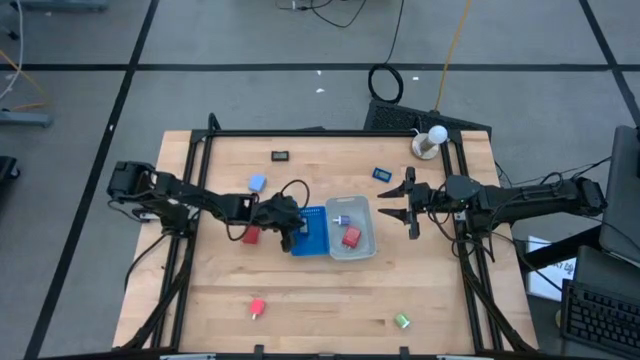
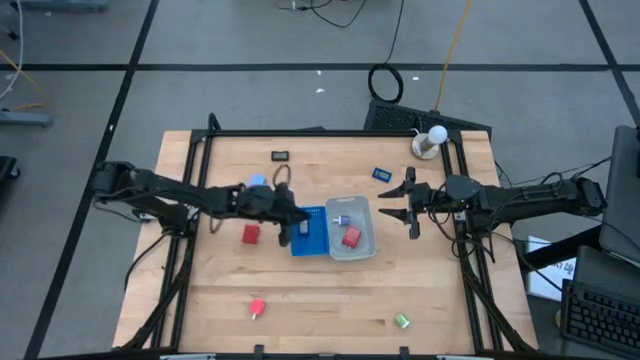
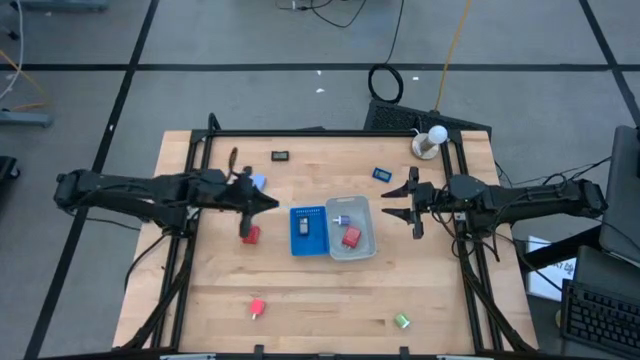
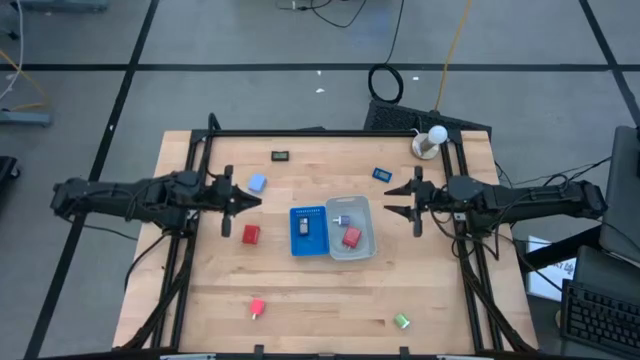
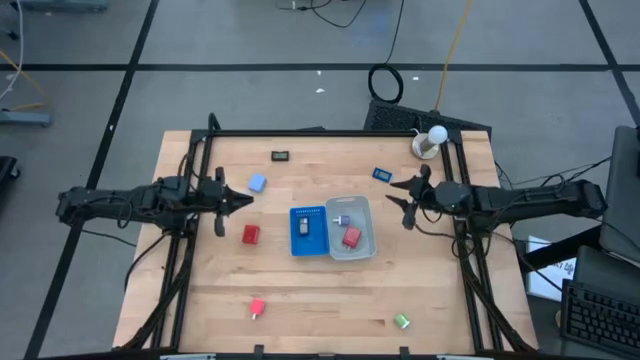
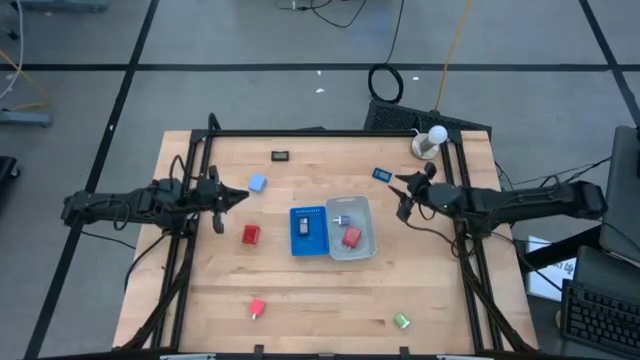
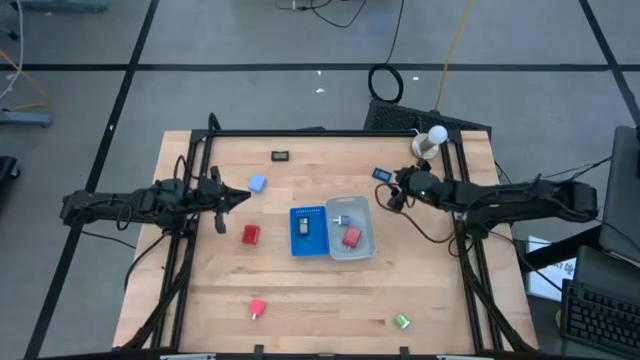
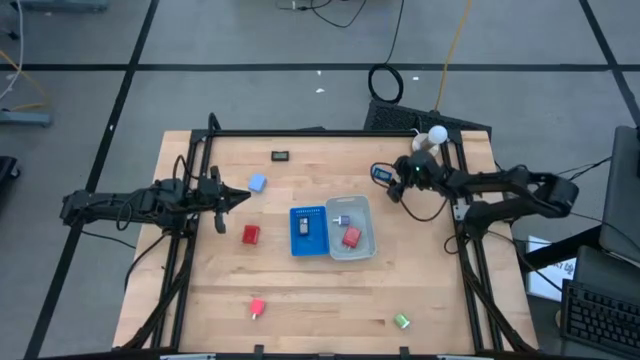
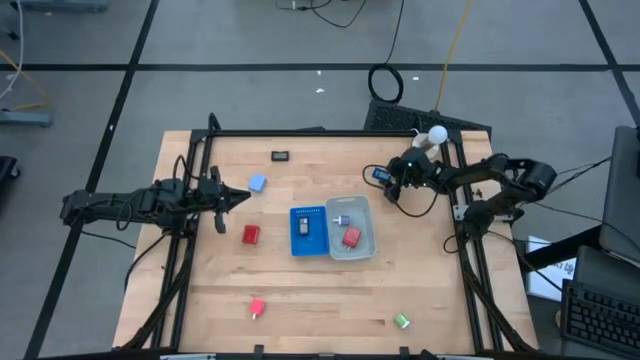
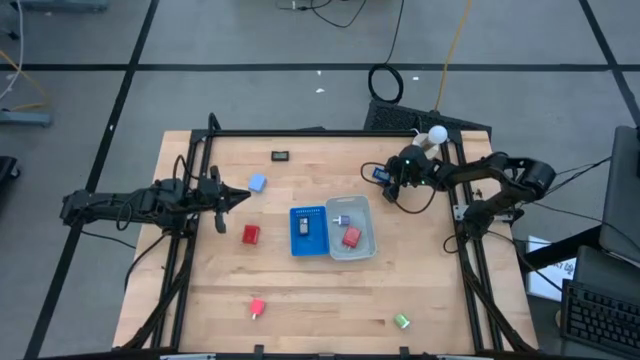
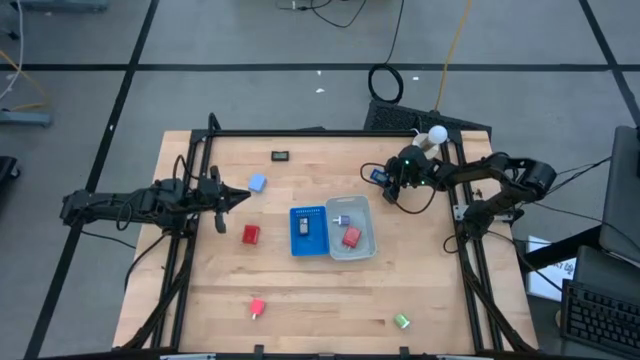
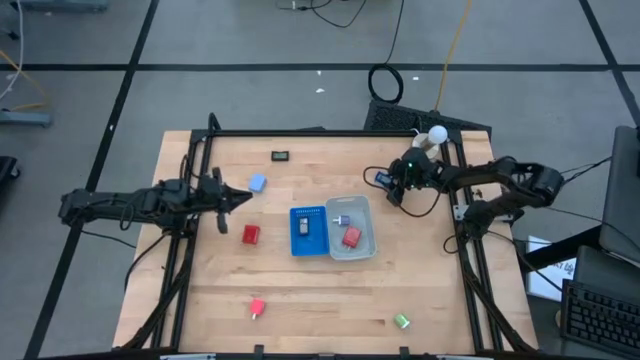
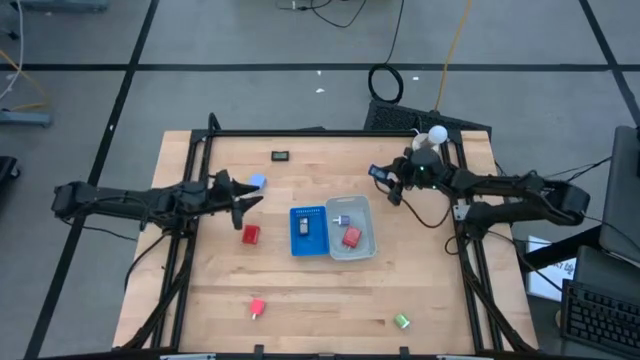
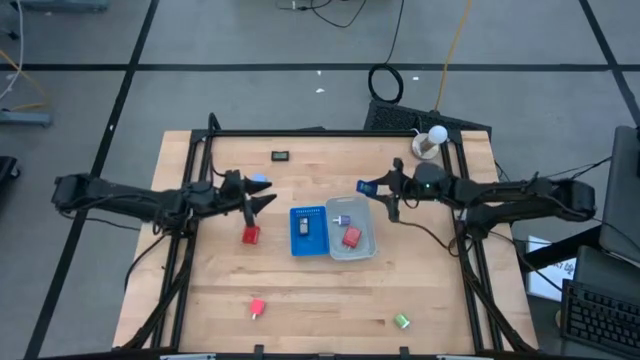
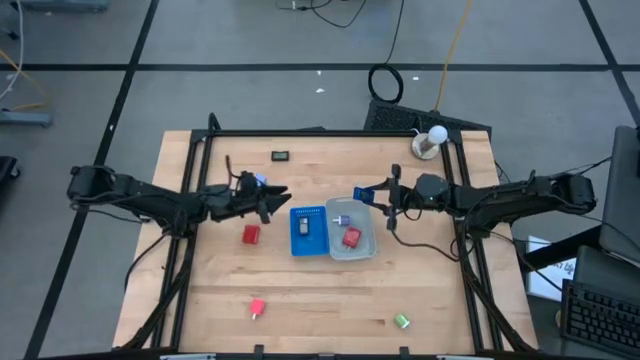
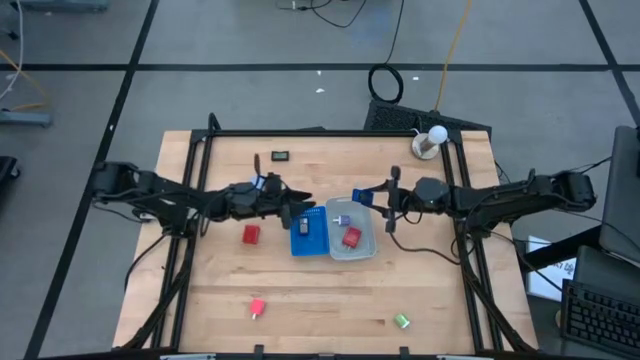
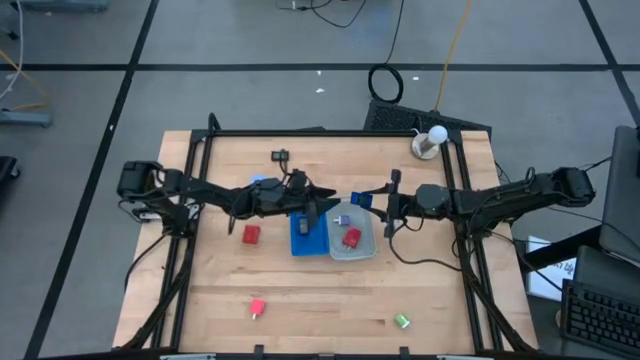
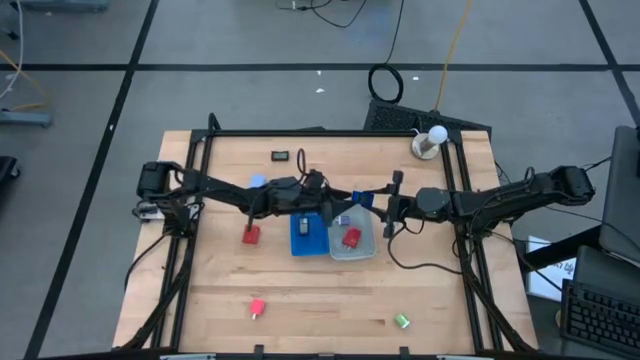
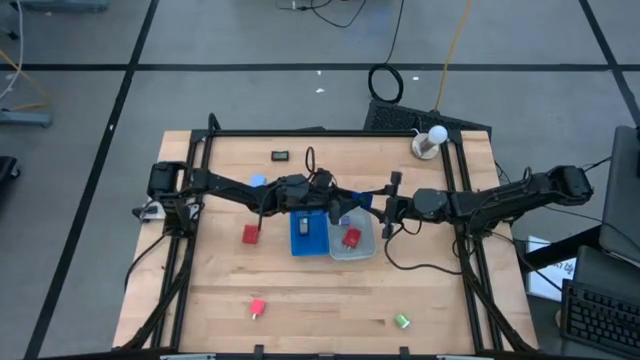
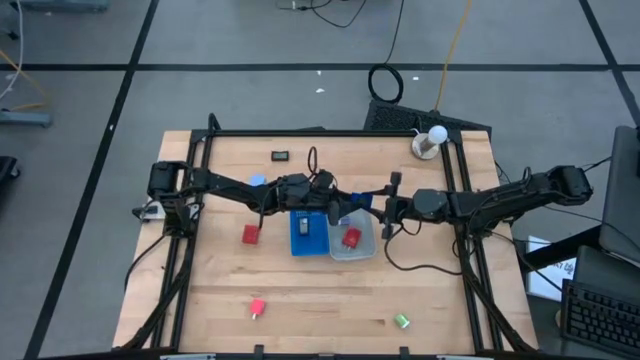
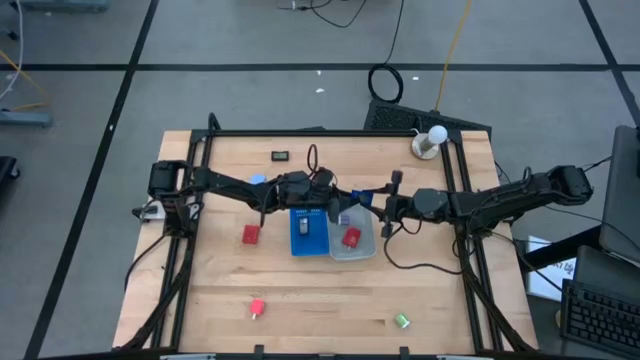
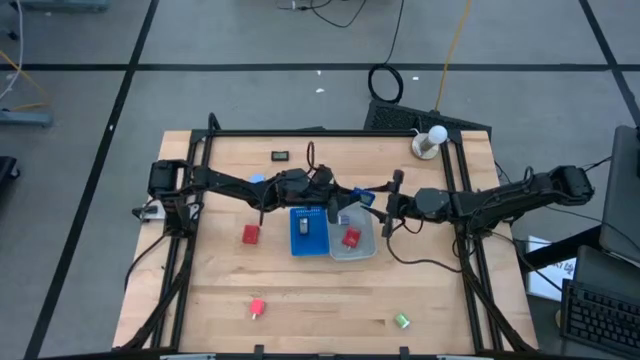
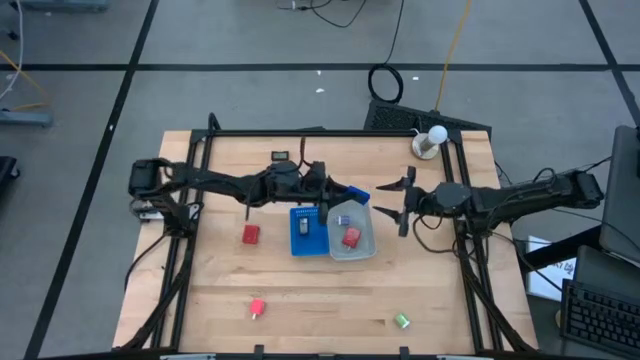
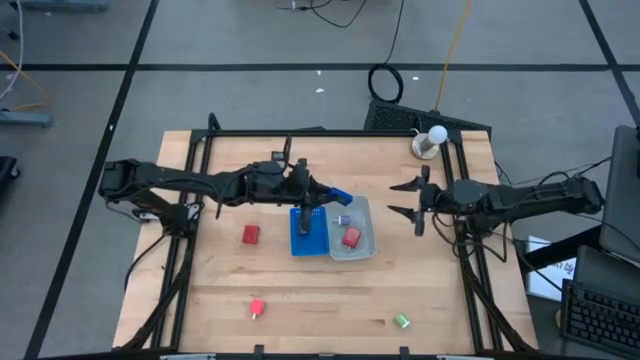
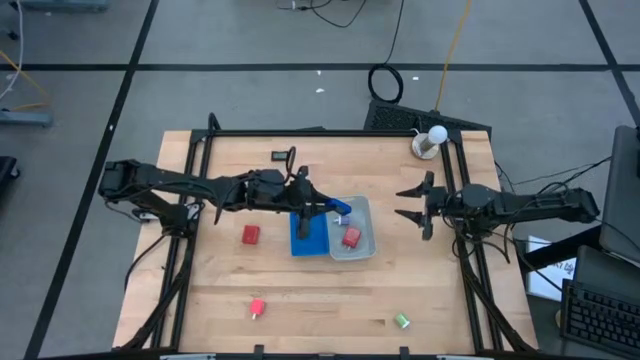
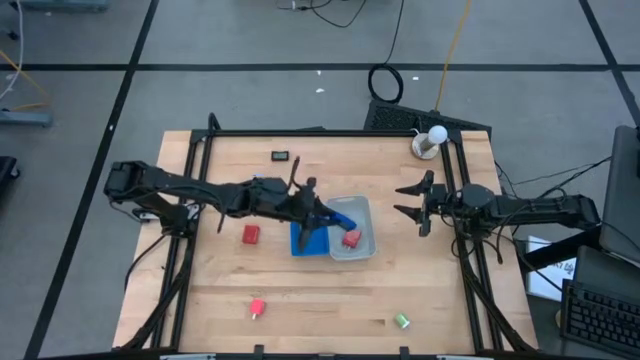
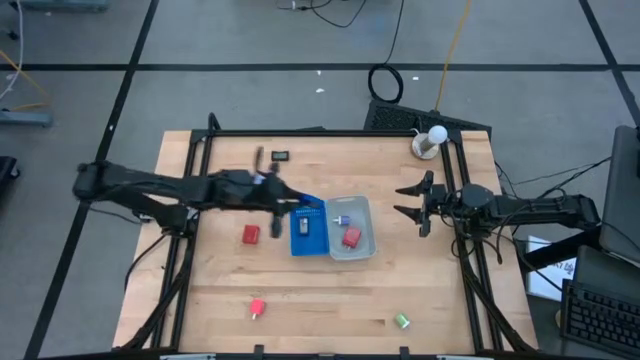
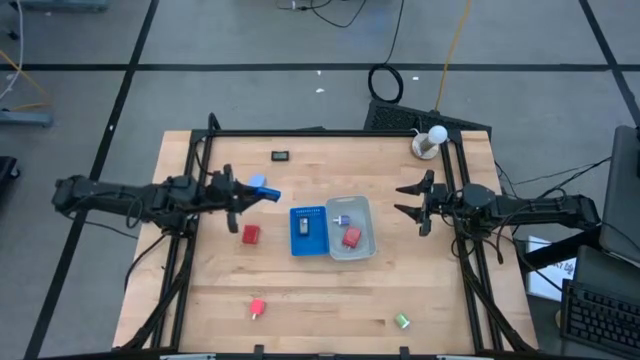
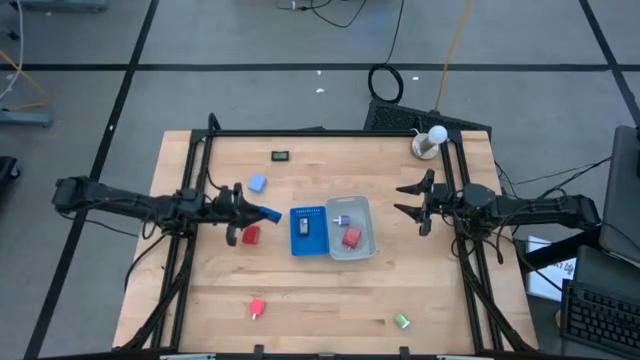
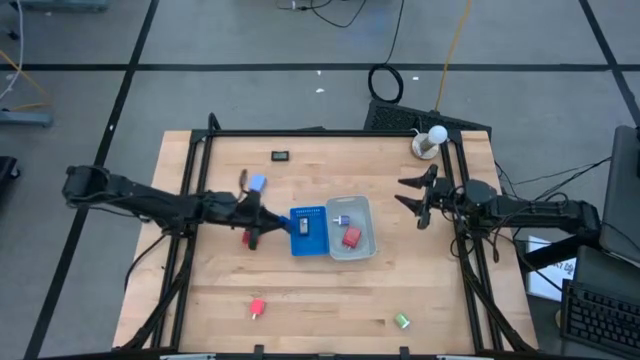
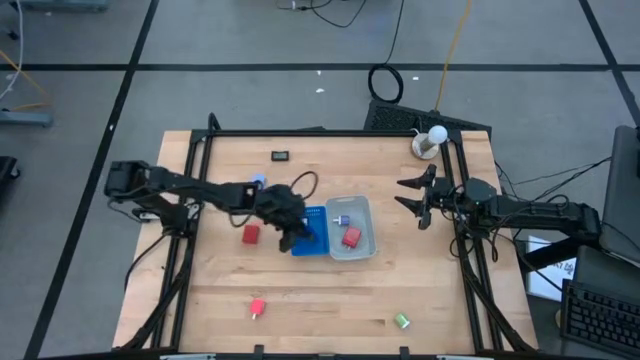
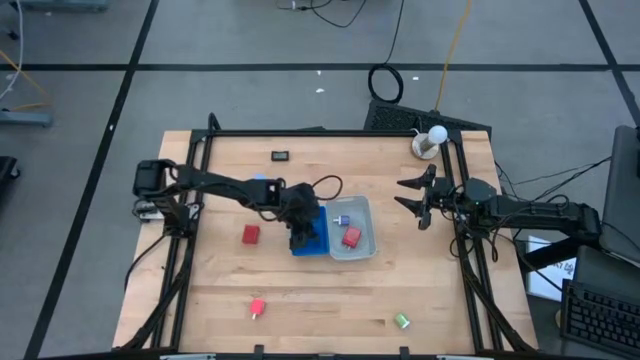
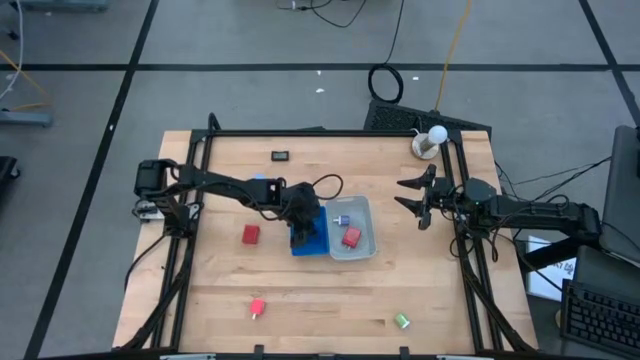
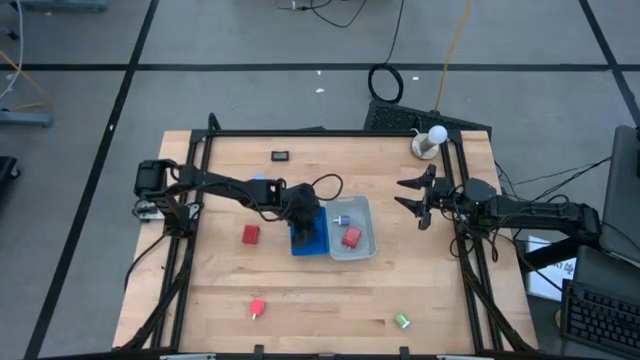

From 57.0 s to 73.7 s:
Task: Pick & Place Office items
Put the blue digital timer into the blue bin

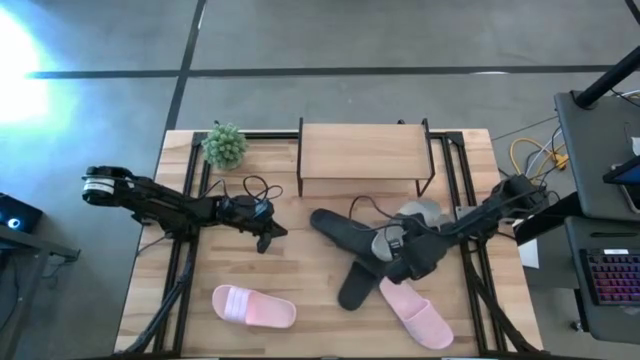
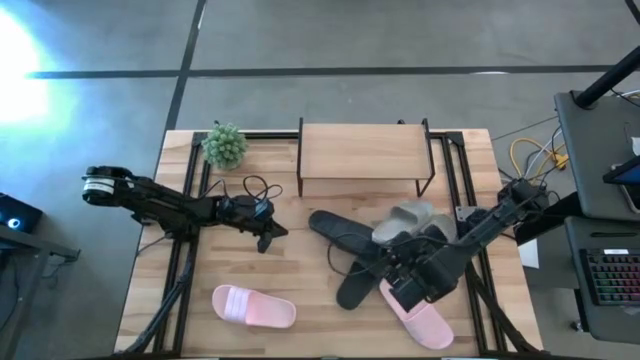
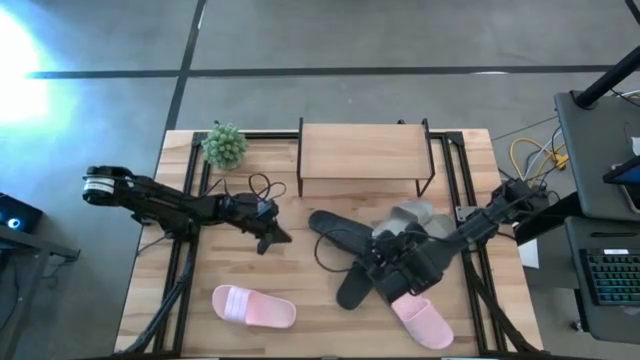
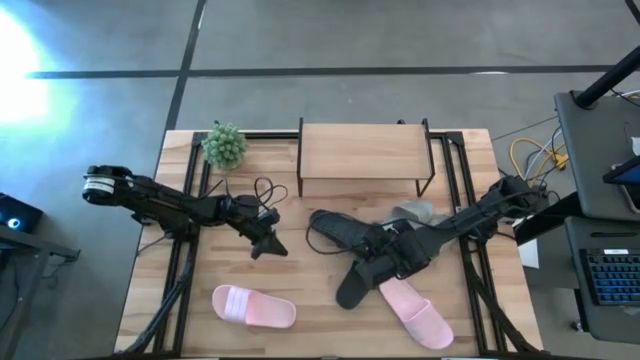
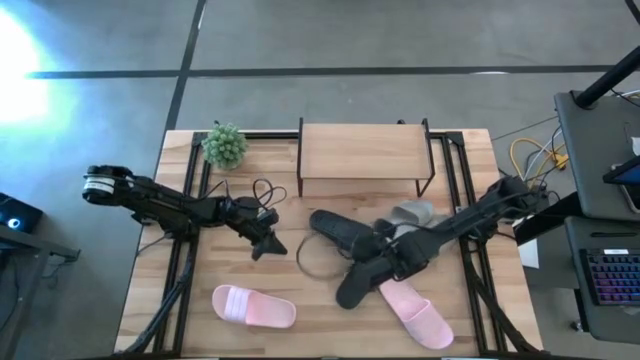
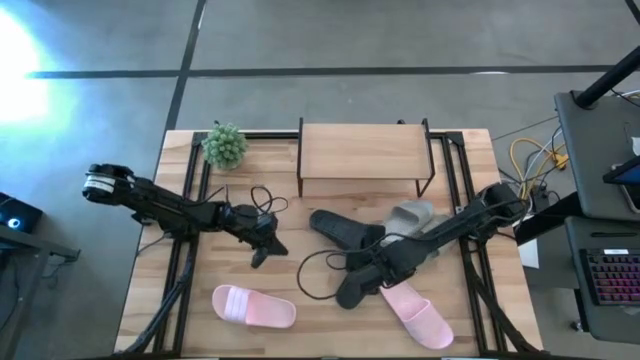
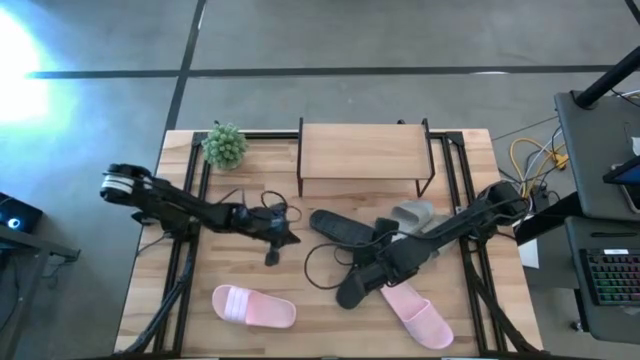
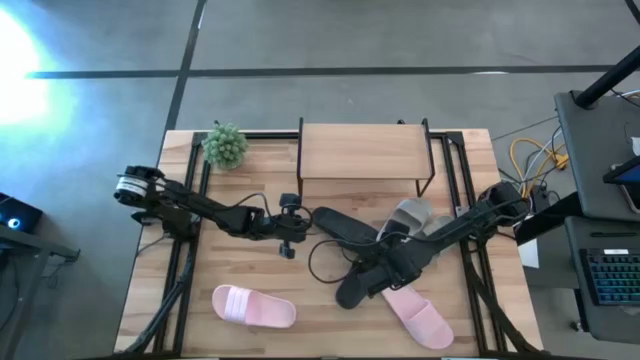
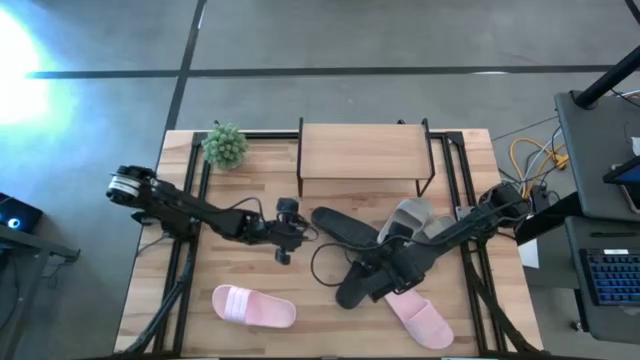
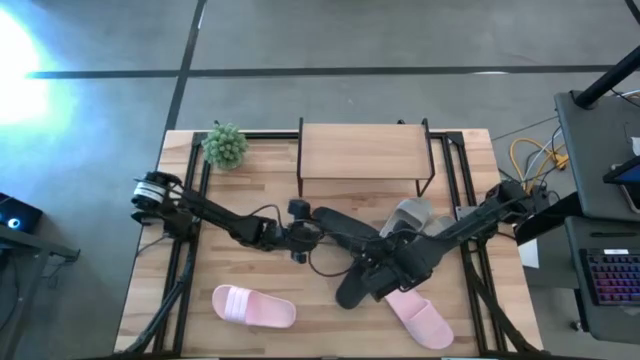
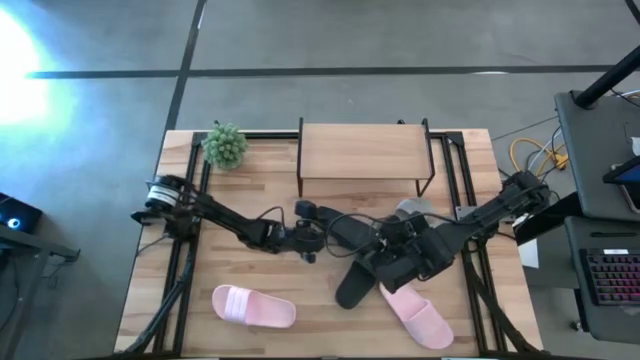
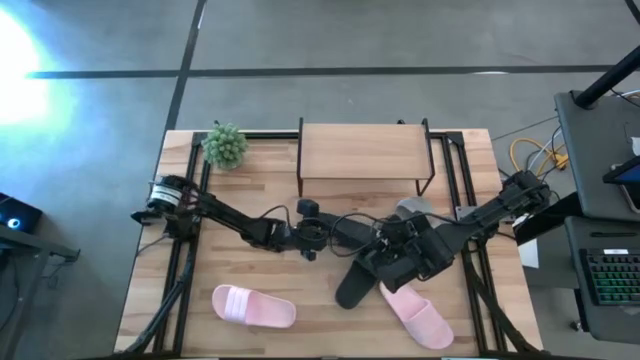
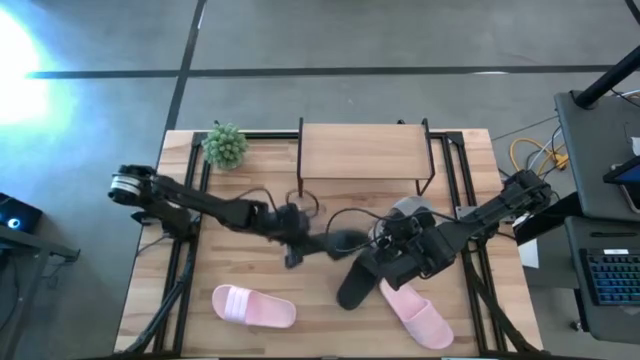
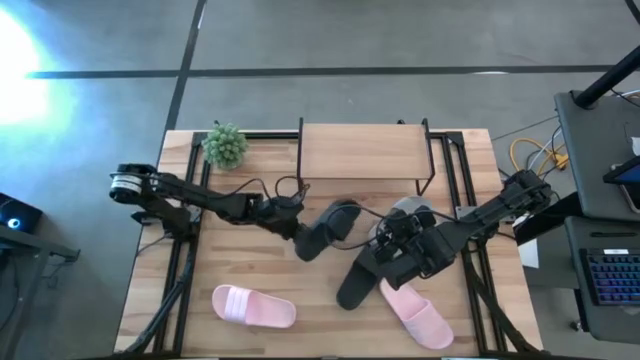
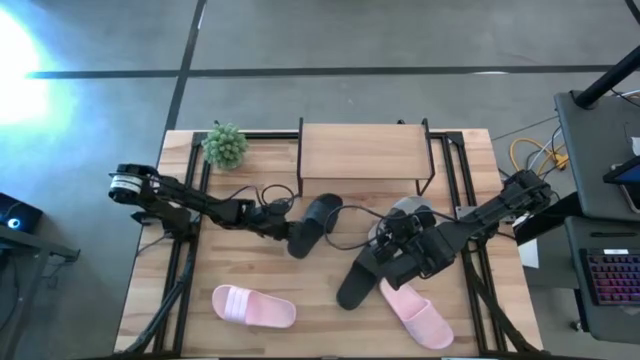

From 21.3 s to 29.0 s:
Task: Pick and place slides into the shelf
Move the left black slipper to the center of the table
